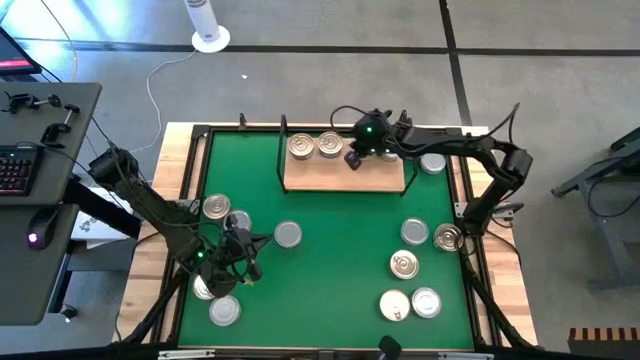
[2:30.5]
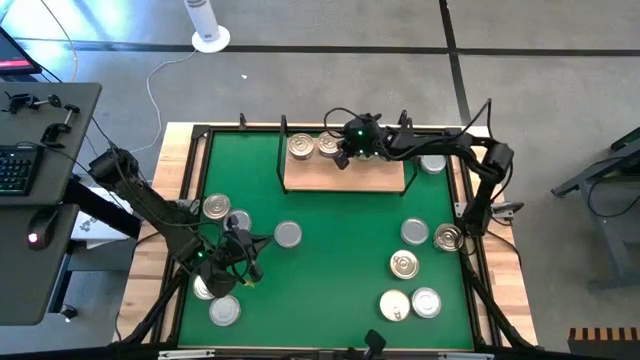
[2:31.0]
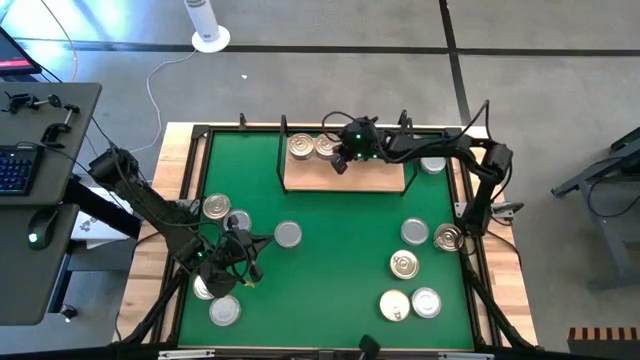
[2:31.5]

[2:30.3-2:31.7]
Task: Stack canned seafood by type on shelf
Adjust the blue/pink tuna can on the shelf

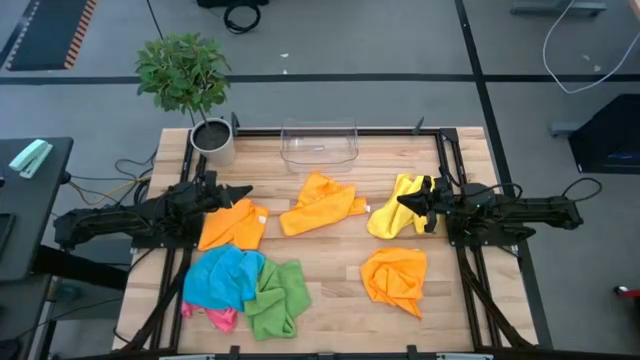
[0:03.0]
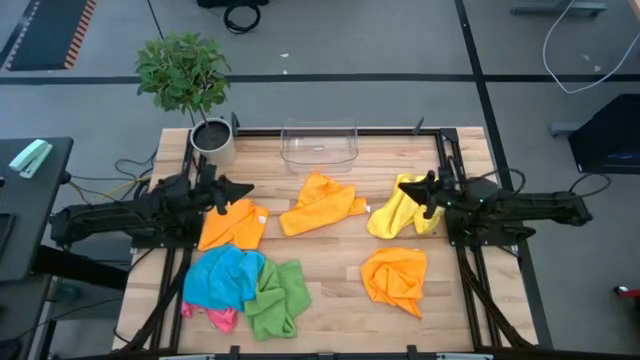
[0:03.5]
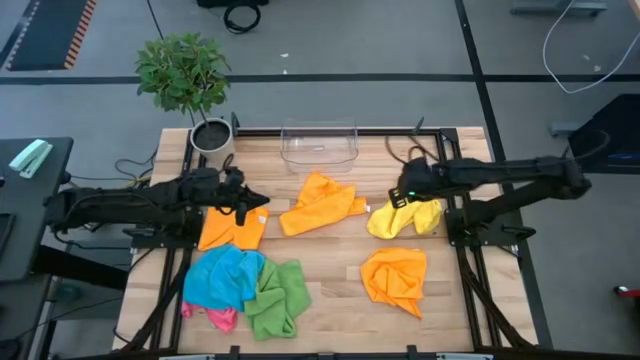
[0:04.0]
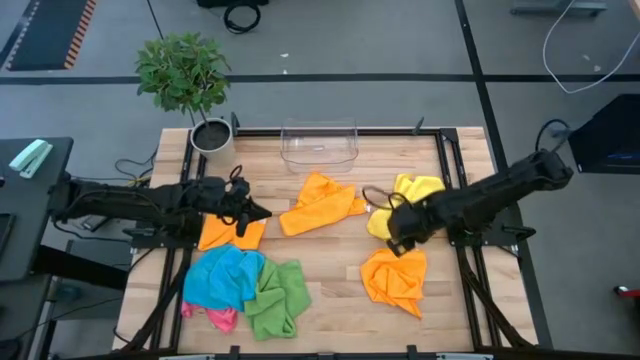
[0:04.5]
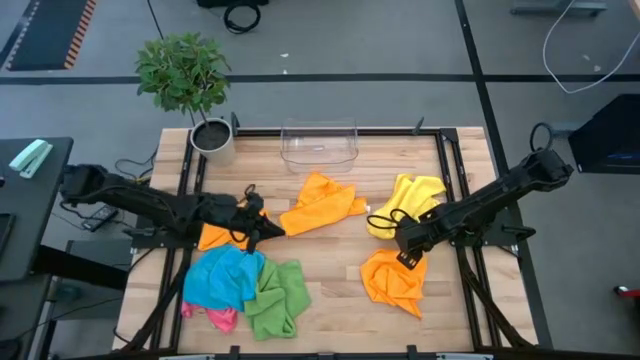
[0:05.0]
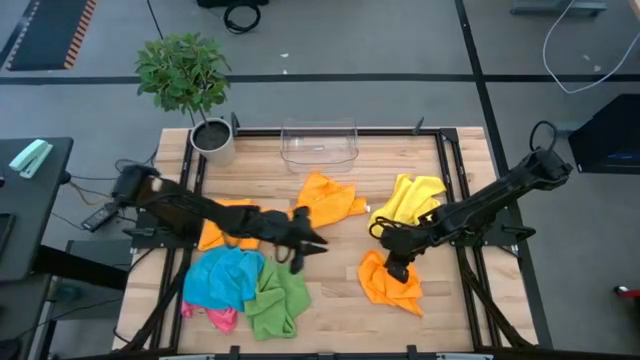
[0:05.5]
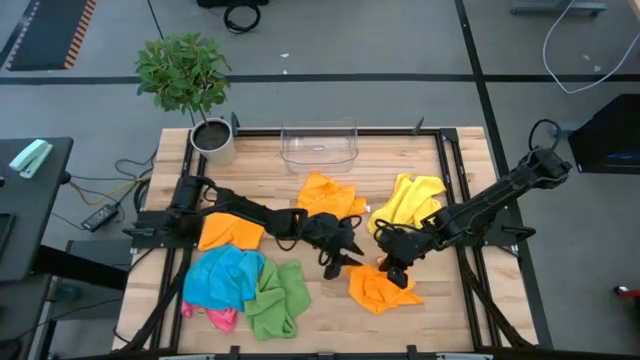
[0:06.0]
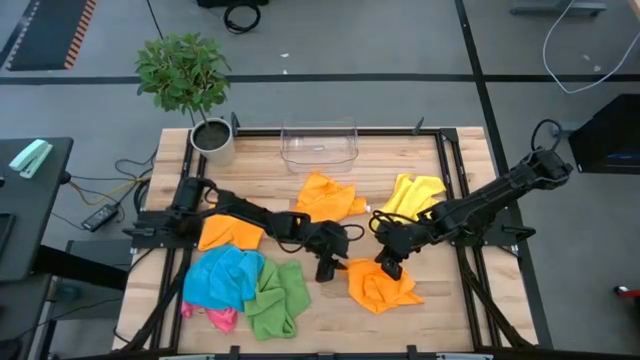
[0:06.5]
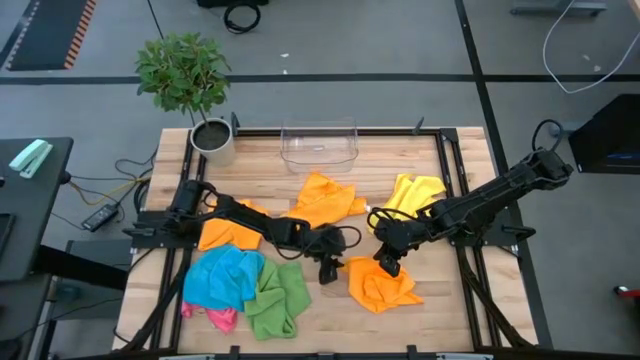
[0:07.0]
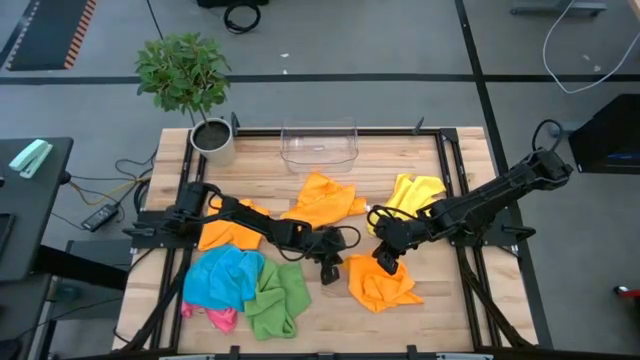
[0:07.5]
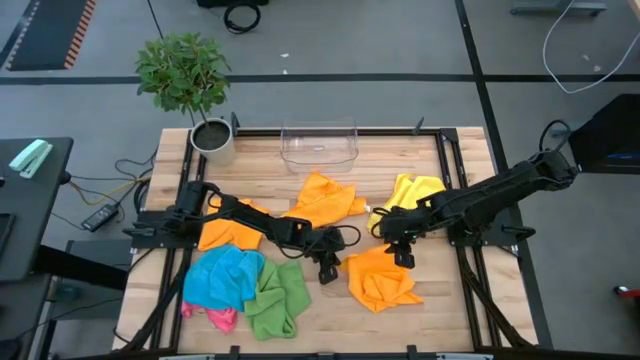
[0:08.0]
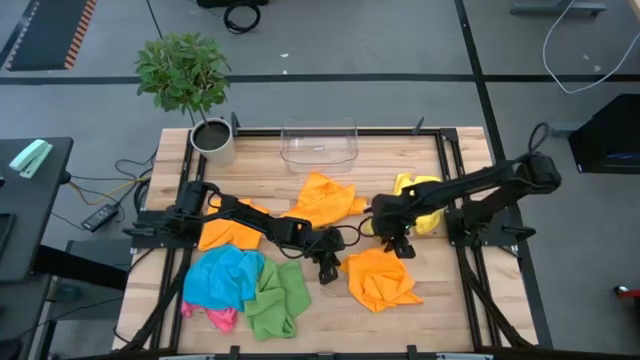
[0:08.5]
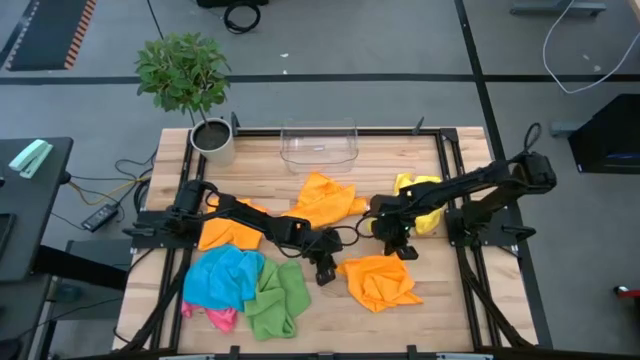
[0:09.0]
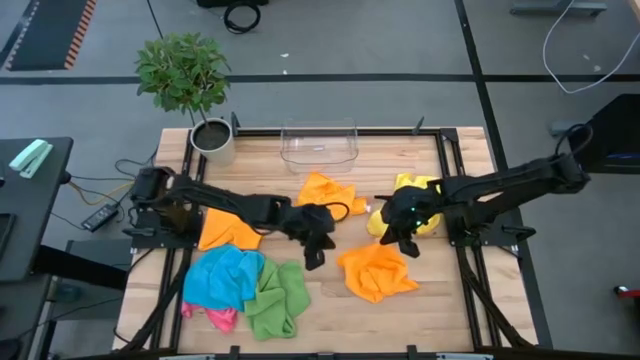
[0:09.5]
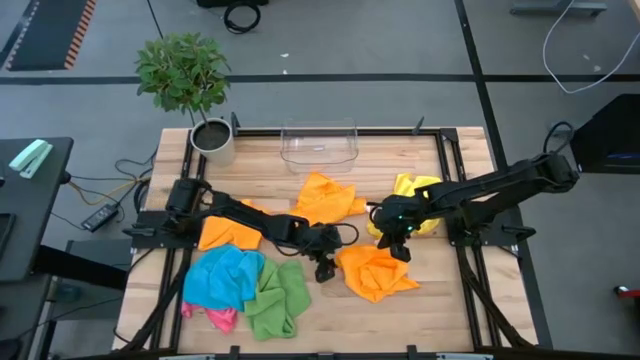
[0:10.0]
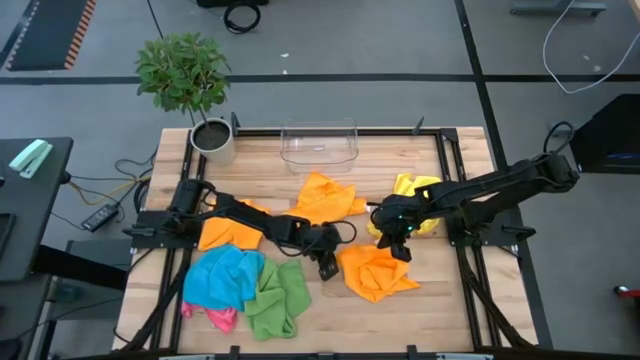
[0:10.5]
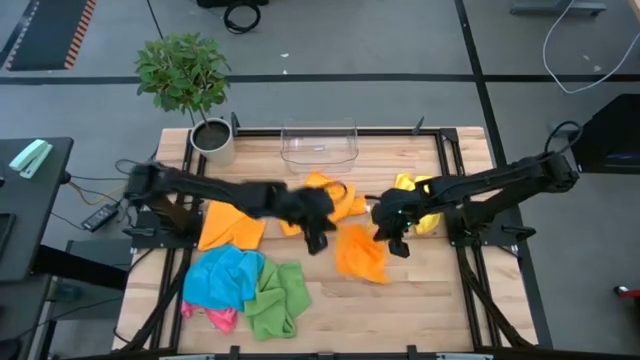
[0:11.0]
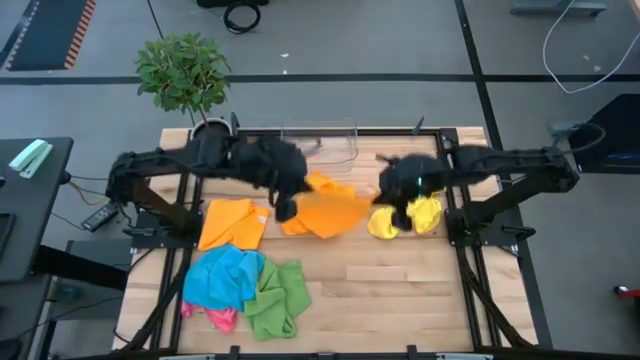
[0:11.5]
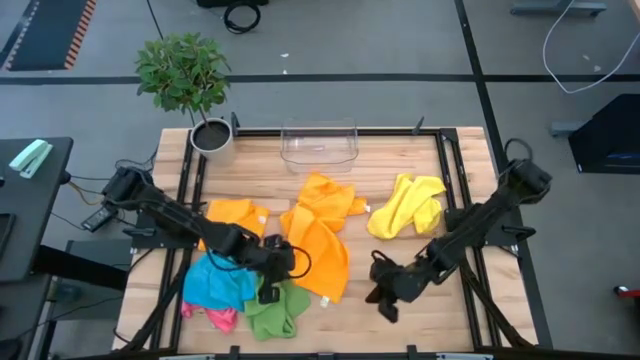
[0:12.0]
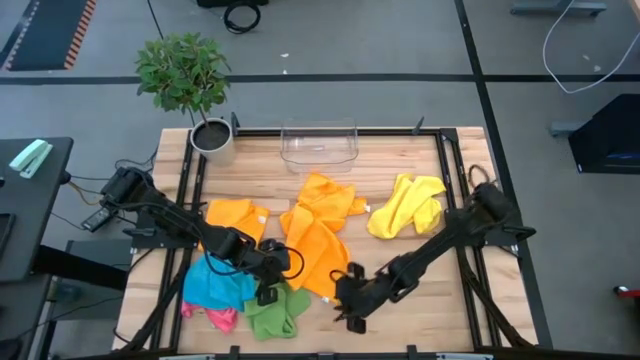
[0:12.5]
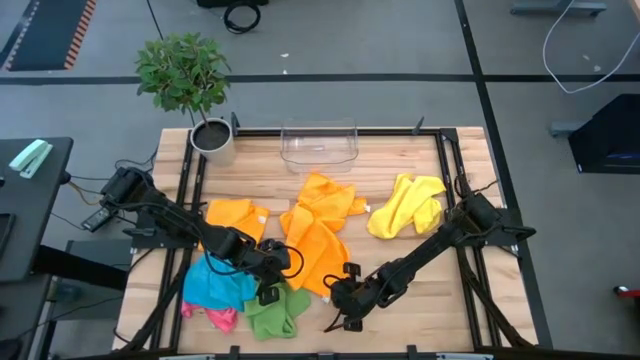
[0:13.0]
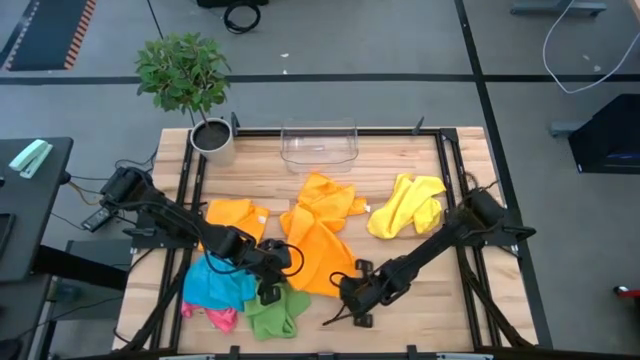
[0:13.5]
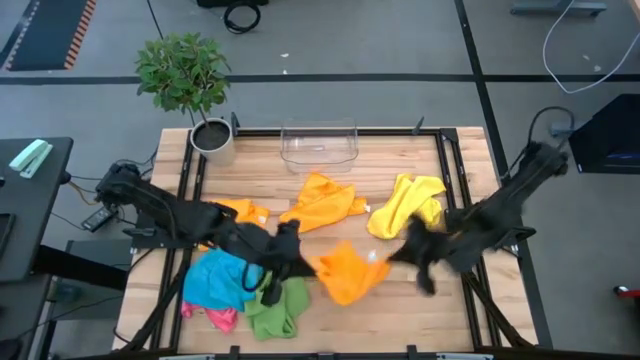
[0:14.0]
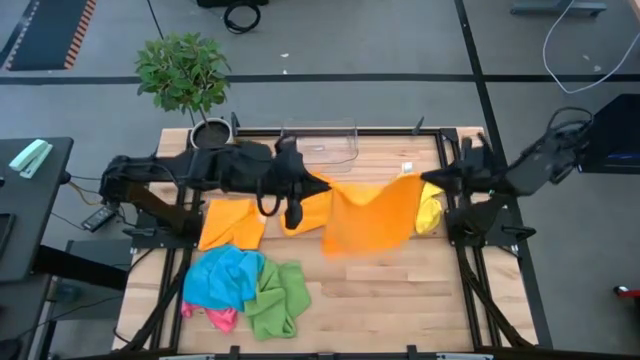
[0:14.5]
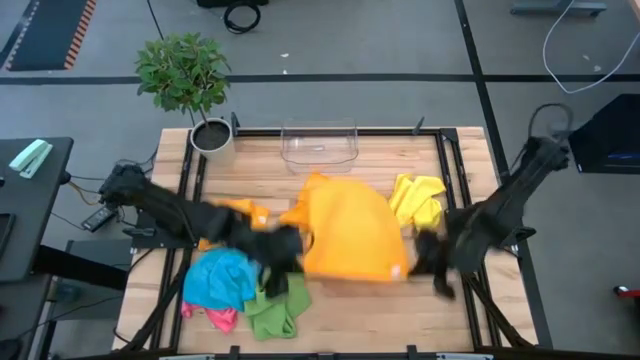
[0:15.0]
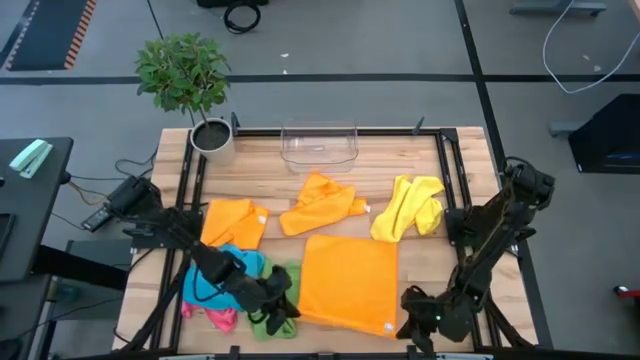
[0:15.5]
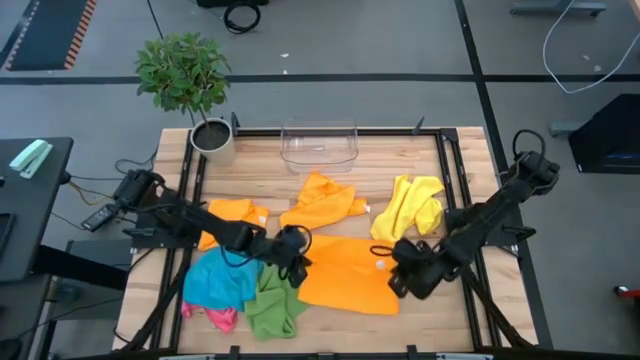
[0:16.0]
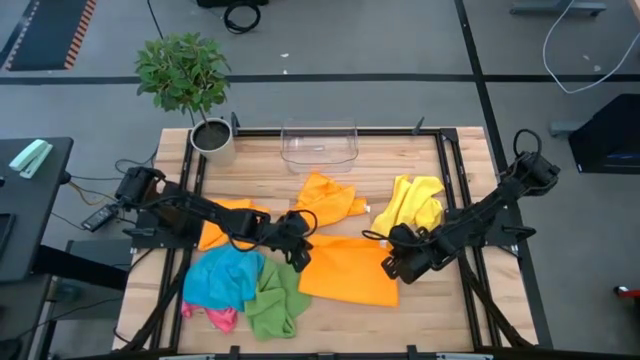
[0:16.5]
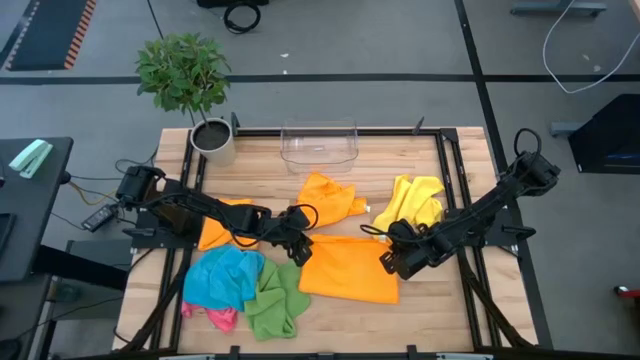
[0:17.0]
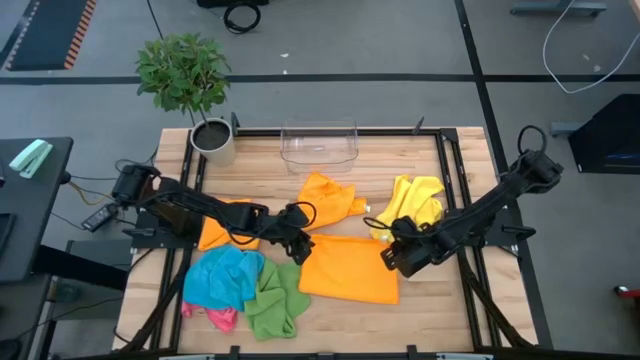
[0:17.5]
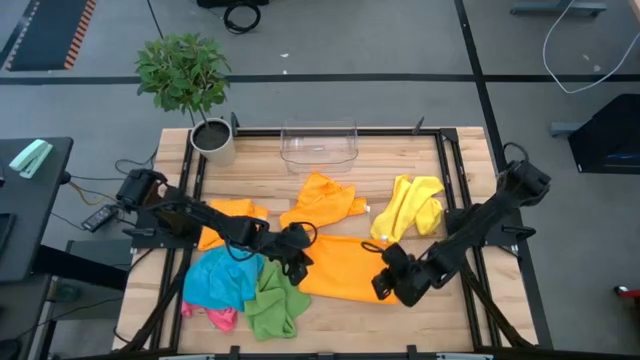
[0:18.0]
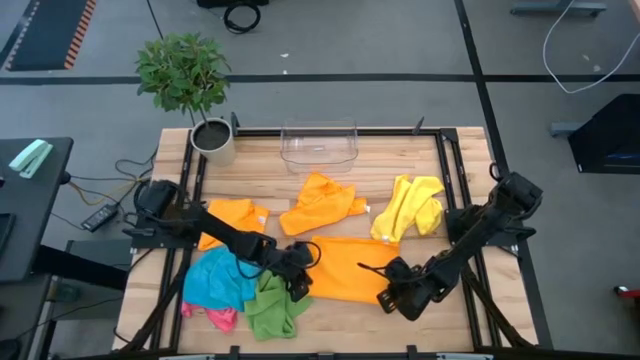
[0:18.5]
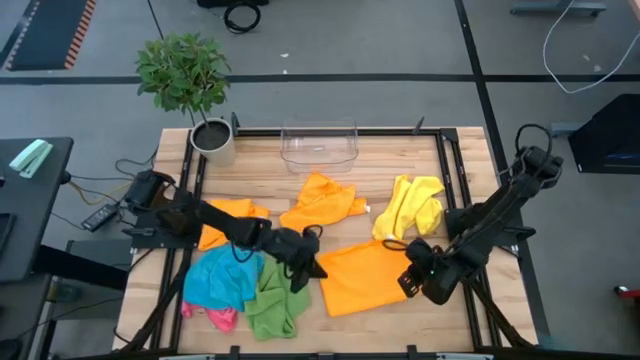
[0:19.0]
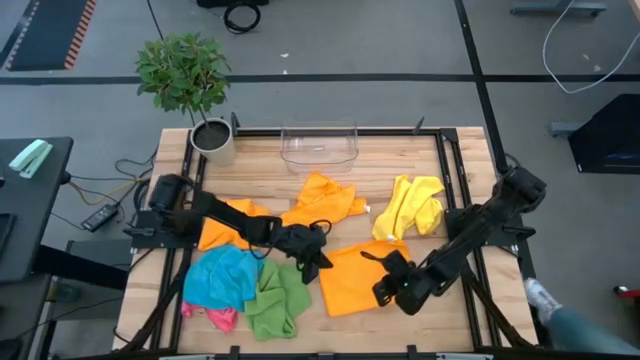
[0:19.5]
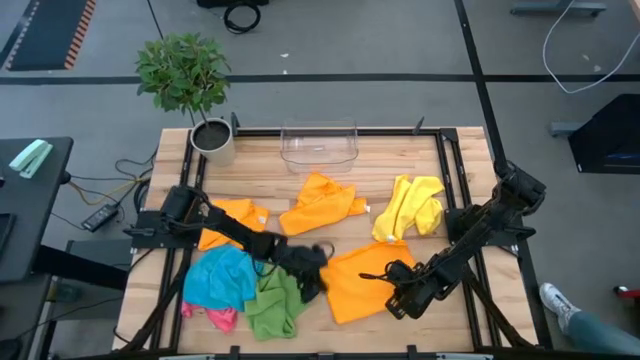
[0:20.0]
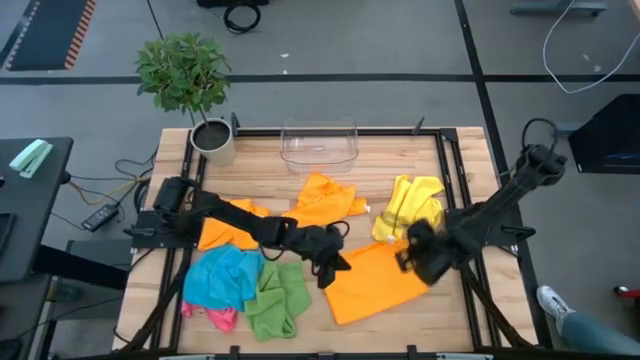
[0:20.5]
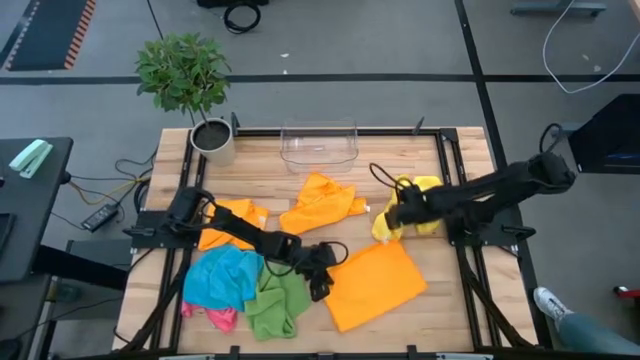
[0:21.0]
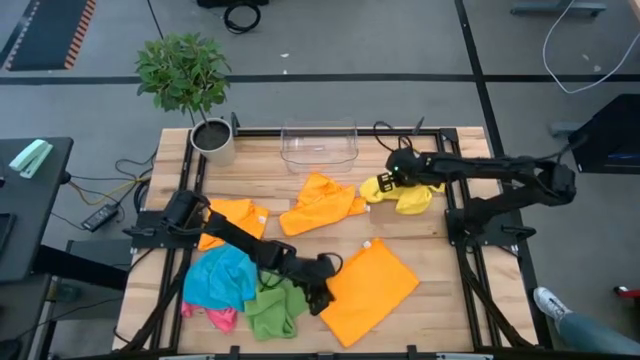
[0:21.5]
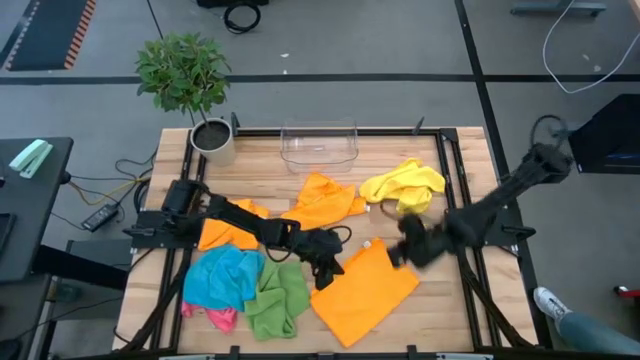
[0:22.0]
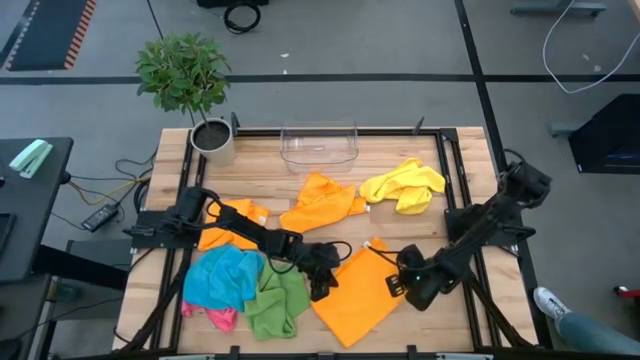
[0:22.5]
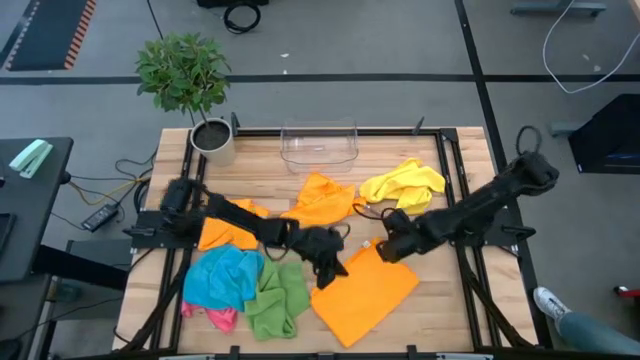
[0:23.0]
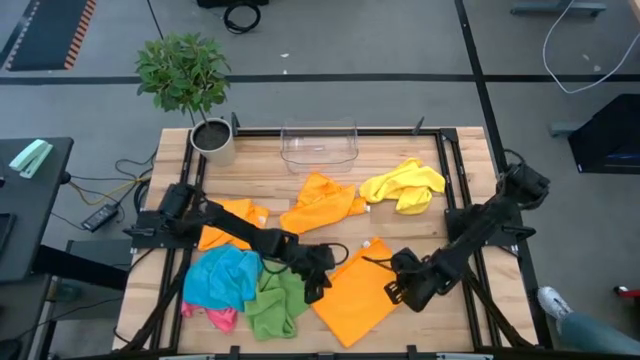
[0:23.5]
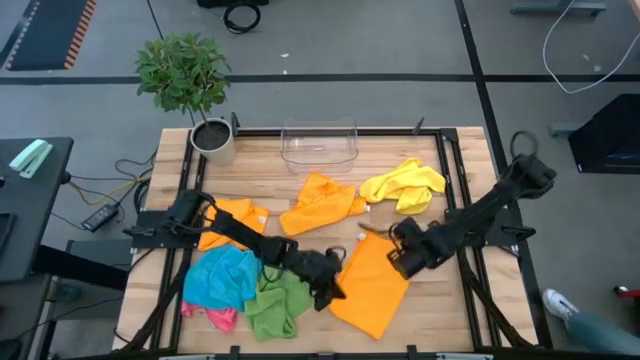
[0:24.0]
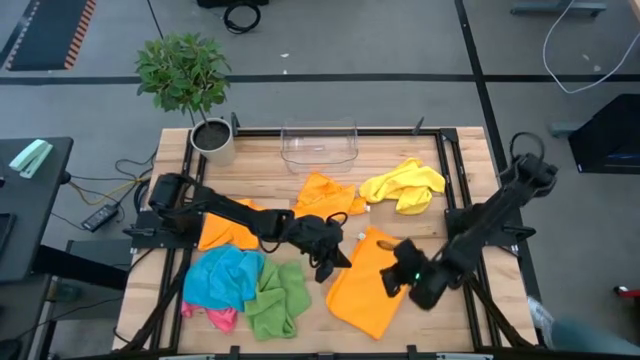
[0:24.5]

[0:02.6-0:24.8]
Task: Fold microfiber towels
Fold the bottom orange towel on the table
